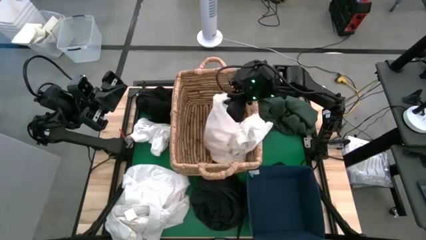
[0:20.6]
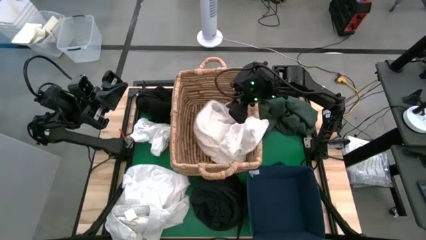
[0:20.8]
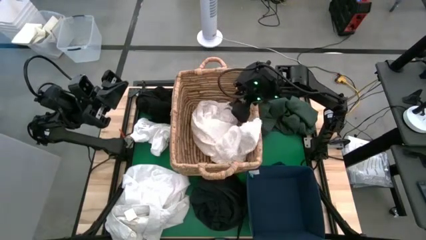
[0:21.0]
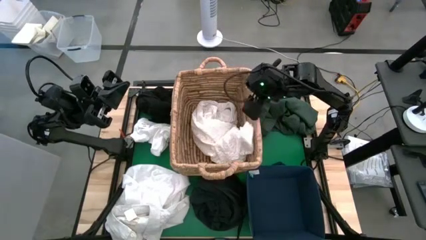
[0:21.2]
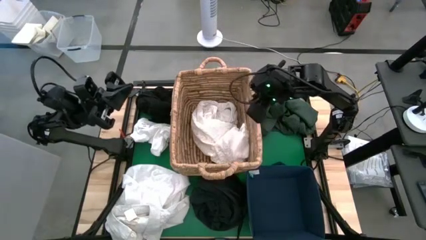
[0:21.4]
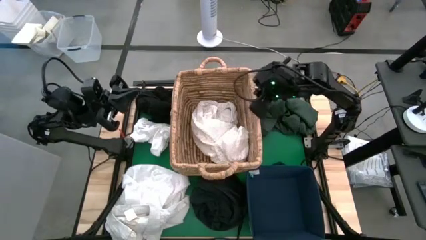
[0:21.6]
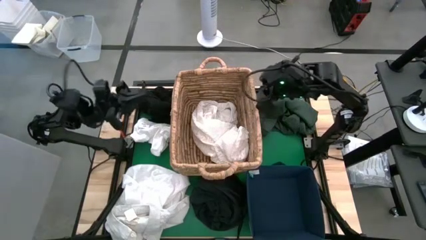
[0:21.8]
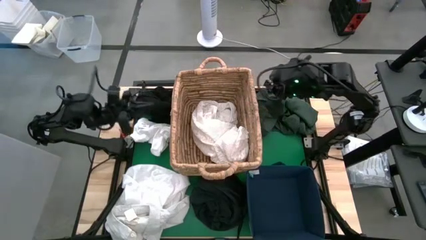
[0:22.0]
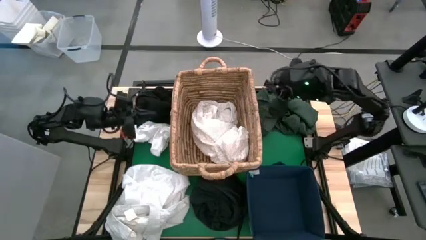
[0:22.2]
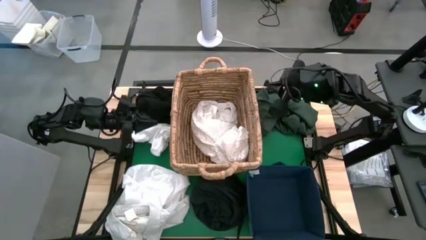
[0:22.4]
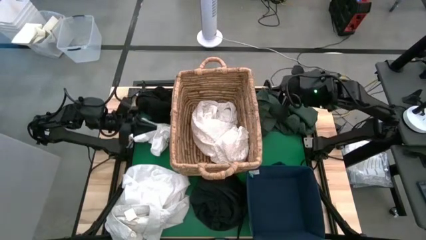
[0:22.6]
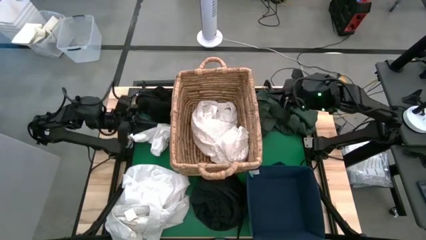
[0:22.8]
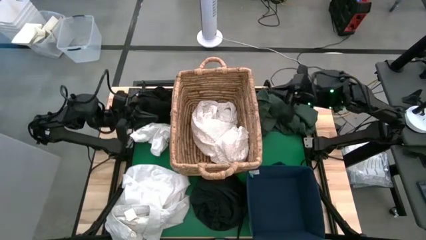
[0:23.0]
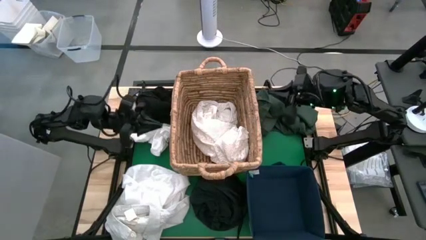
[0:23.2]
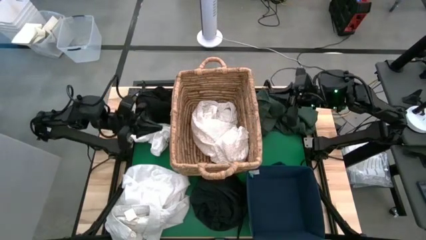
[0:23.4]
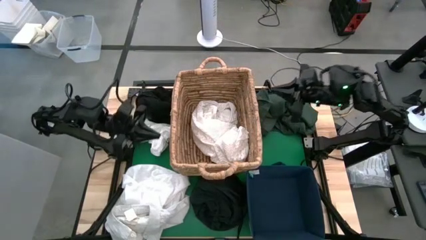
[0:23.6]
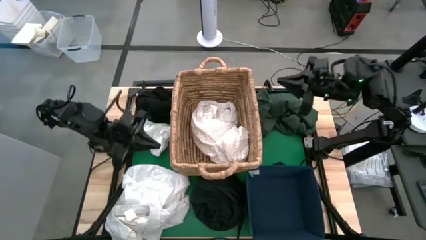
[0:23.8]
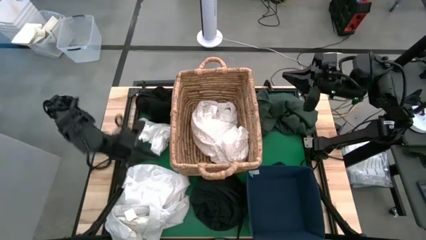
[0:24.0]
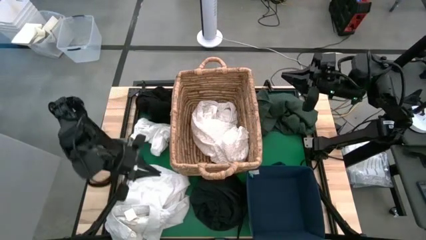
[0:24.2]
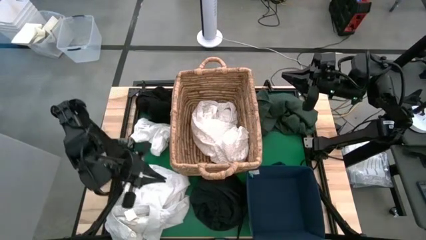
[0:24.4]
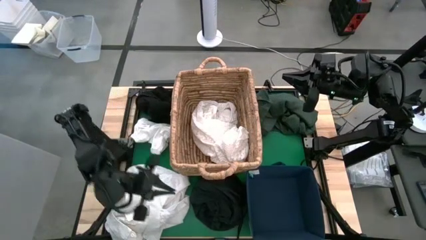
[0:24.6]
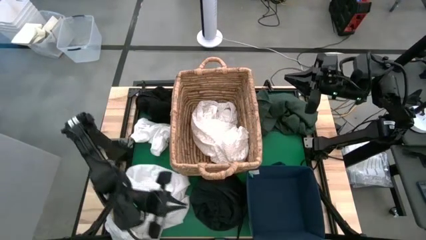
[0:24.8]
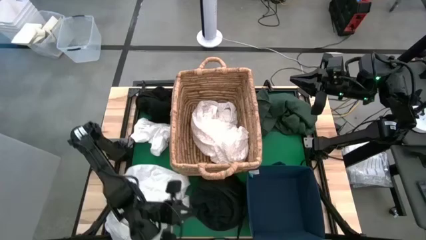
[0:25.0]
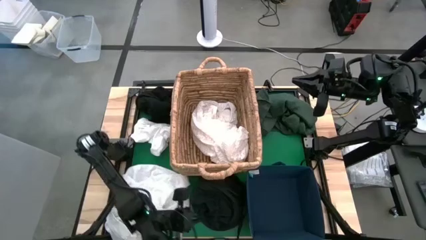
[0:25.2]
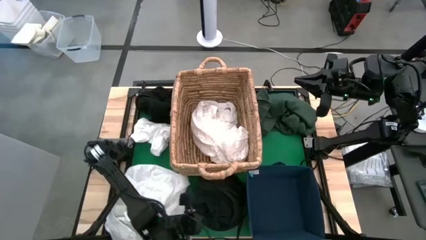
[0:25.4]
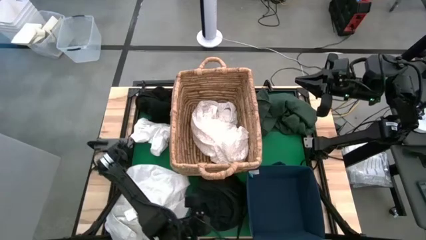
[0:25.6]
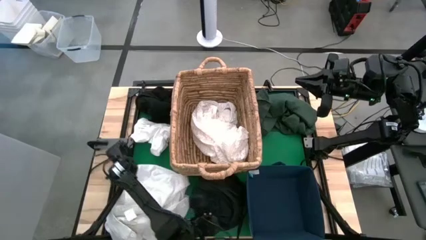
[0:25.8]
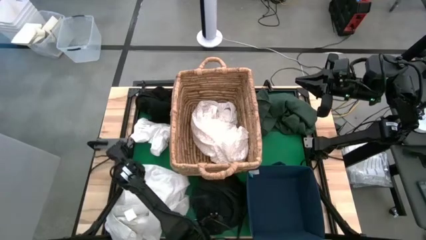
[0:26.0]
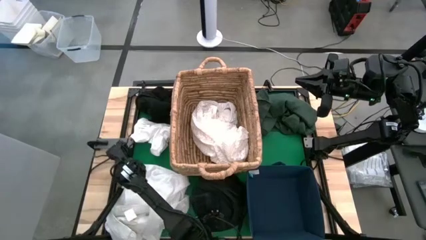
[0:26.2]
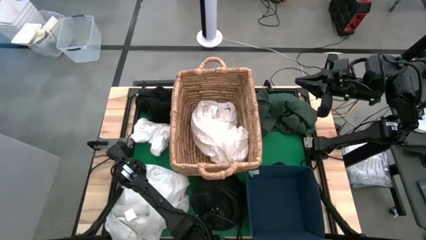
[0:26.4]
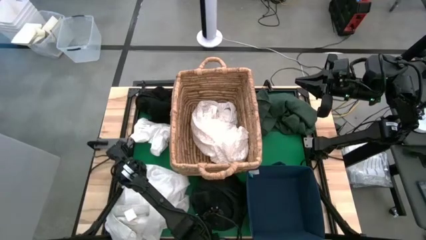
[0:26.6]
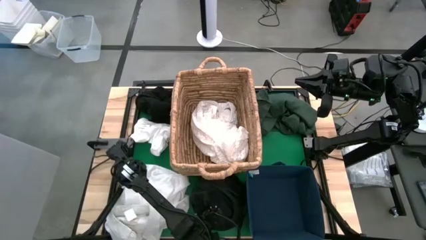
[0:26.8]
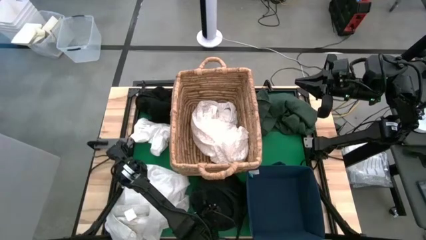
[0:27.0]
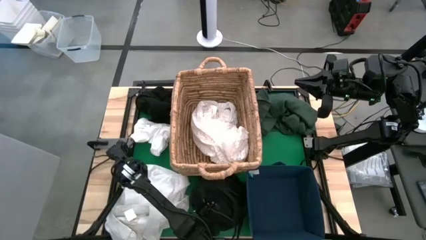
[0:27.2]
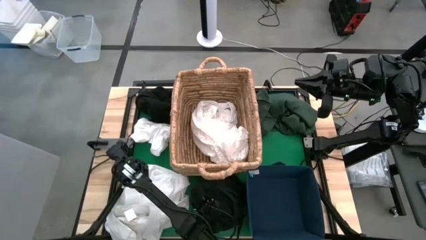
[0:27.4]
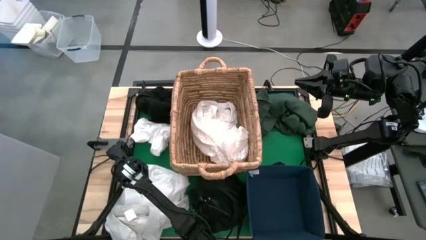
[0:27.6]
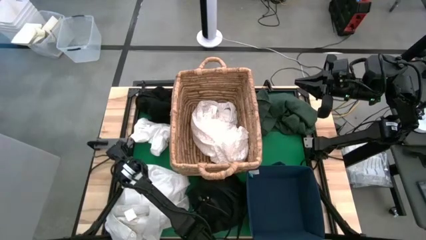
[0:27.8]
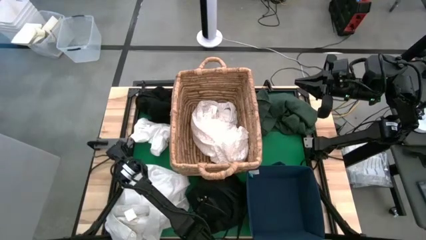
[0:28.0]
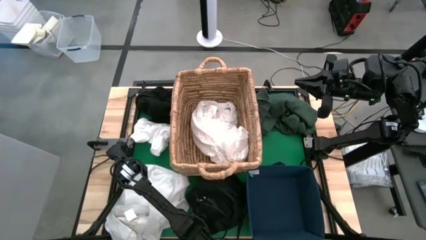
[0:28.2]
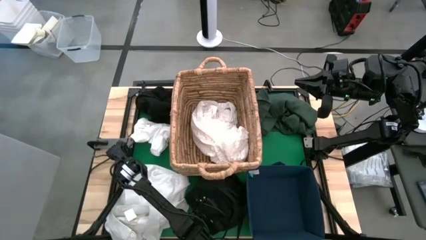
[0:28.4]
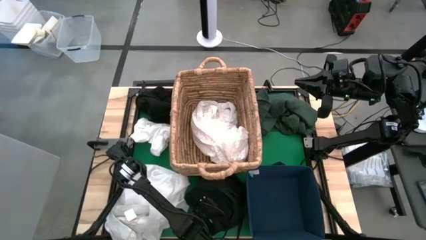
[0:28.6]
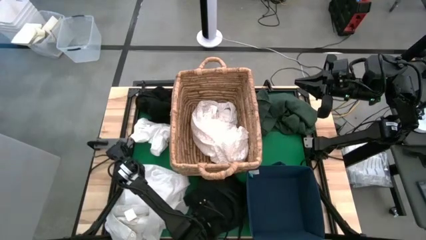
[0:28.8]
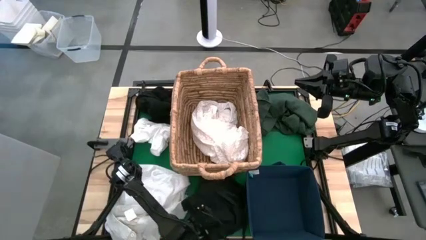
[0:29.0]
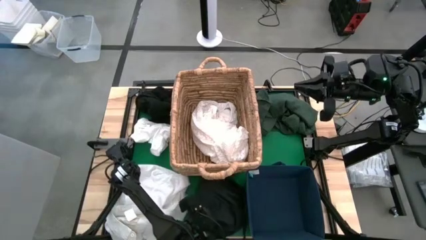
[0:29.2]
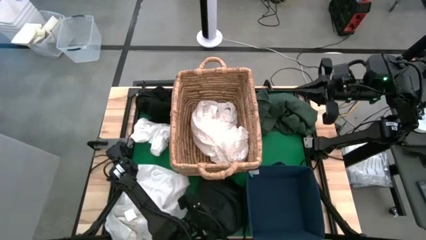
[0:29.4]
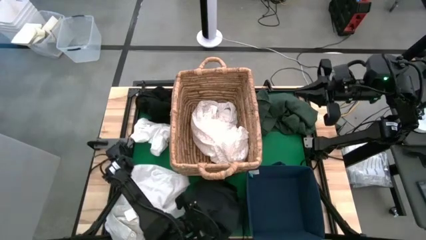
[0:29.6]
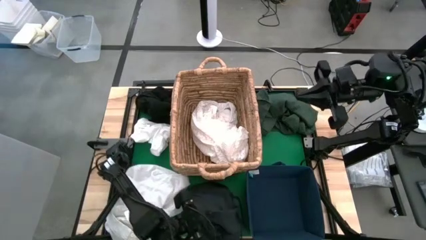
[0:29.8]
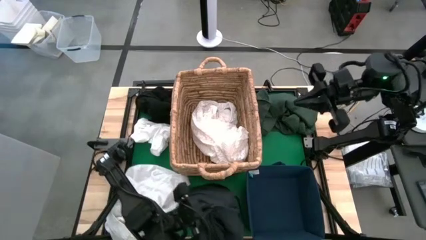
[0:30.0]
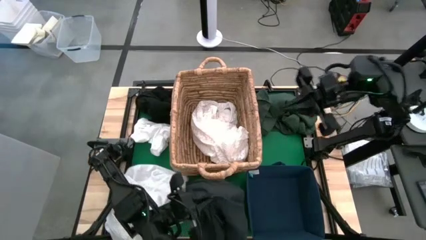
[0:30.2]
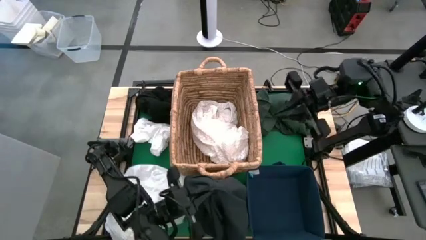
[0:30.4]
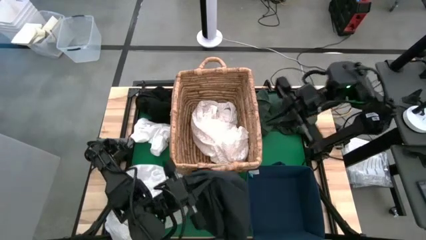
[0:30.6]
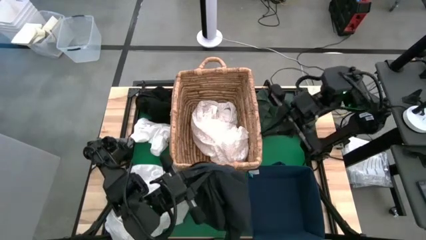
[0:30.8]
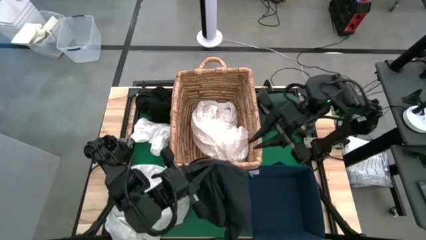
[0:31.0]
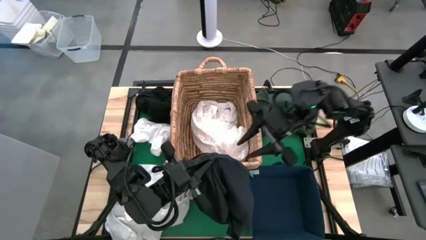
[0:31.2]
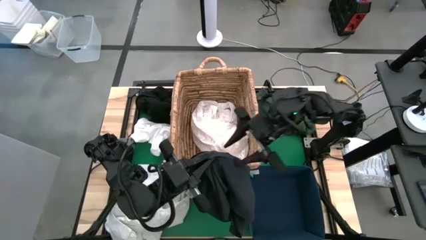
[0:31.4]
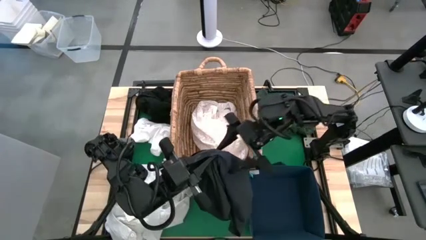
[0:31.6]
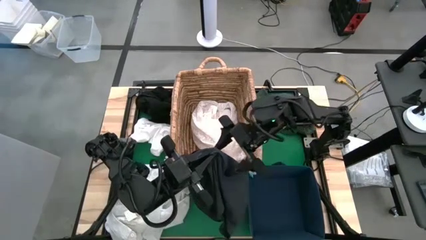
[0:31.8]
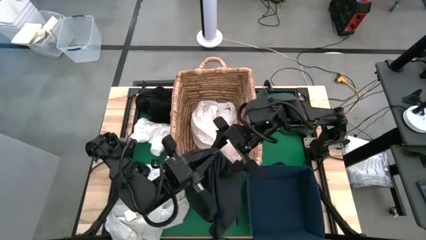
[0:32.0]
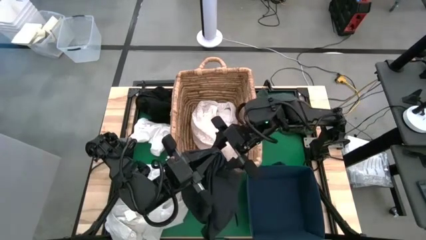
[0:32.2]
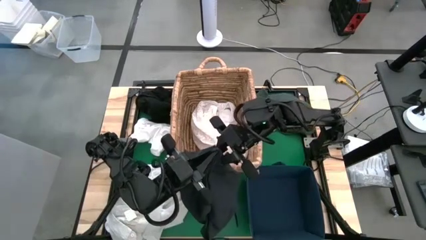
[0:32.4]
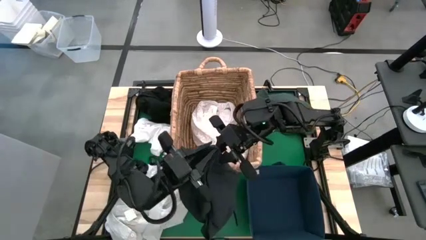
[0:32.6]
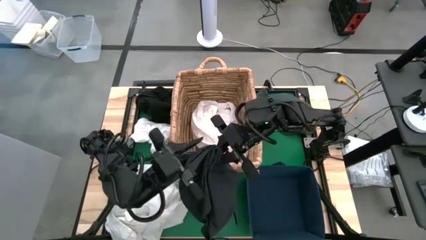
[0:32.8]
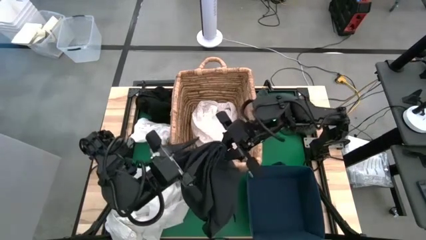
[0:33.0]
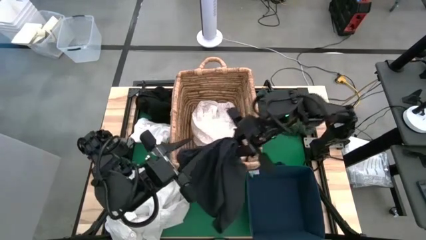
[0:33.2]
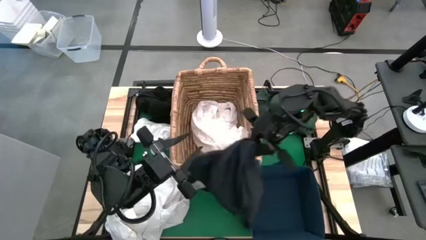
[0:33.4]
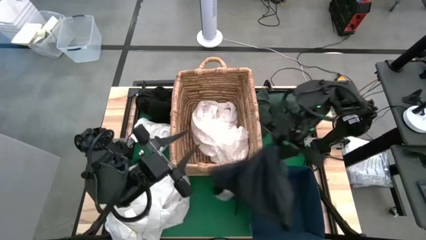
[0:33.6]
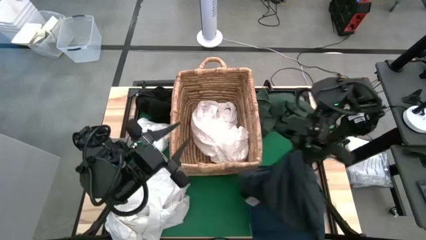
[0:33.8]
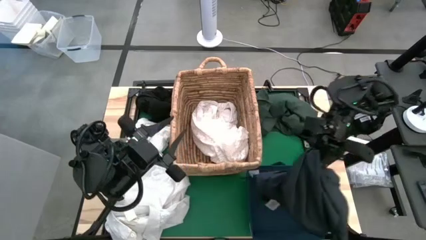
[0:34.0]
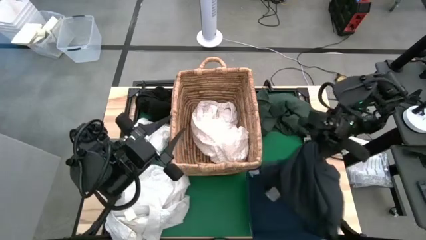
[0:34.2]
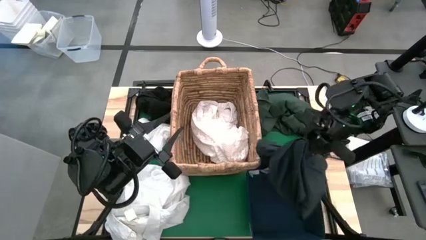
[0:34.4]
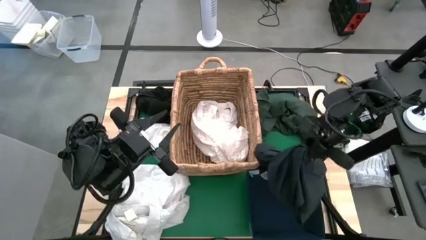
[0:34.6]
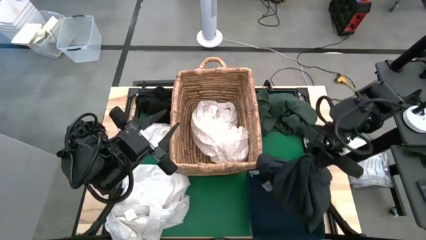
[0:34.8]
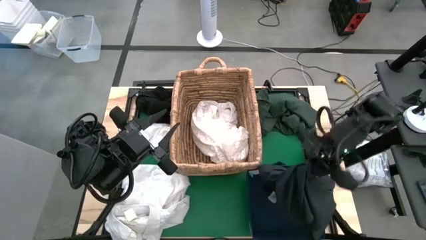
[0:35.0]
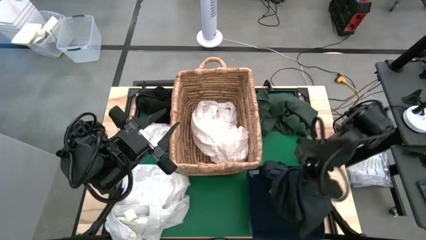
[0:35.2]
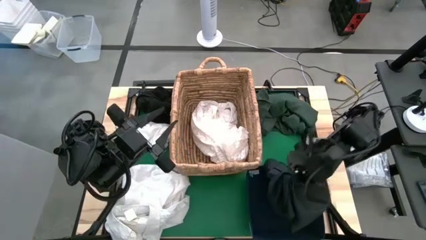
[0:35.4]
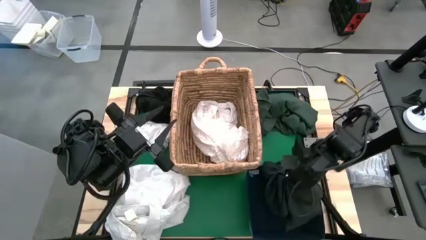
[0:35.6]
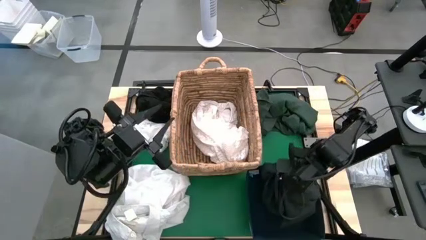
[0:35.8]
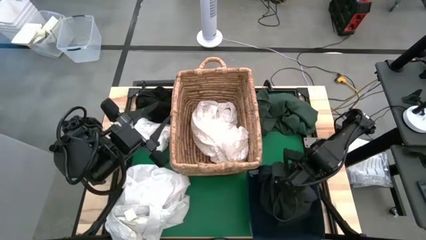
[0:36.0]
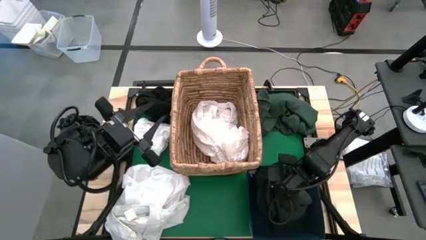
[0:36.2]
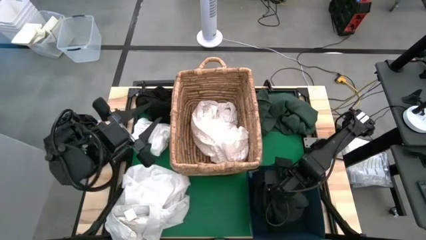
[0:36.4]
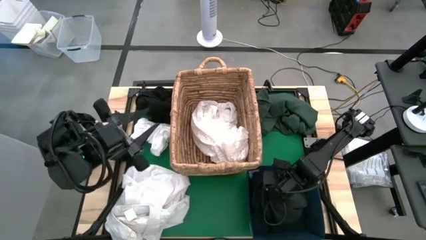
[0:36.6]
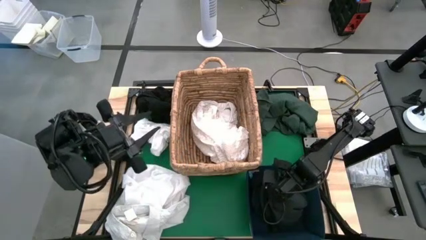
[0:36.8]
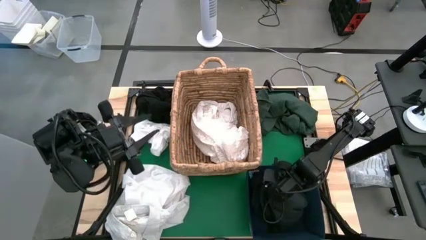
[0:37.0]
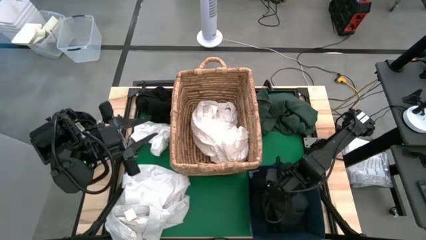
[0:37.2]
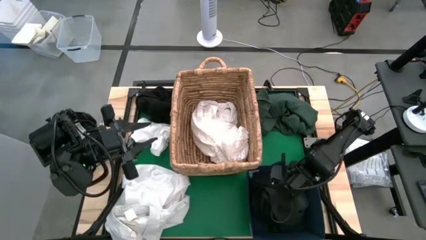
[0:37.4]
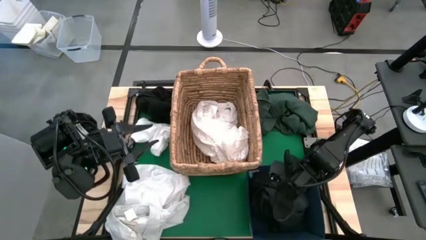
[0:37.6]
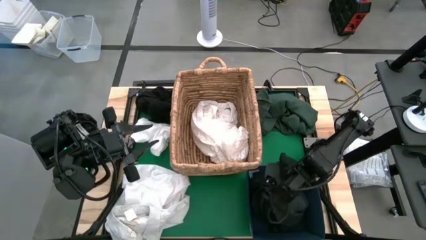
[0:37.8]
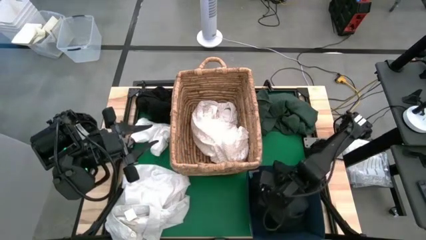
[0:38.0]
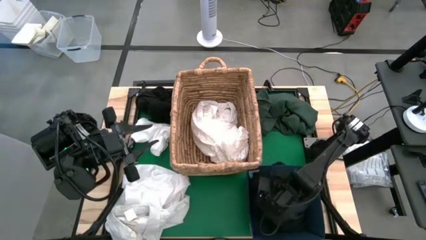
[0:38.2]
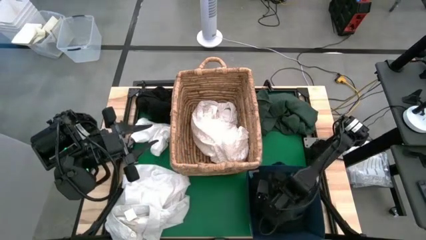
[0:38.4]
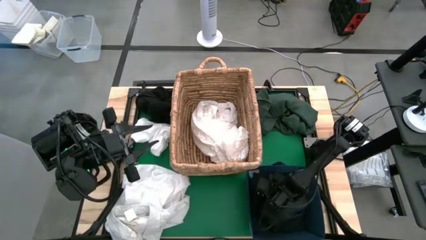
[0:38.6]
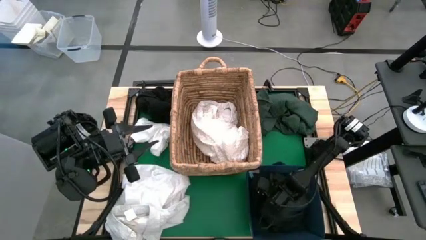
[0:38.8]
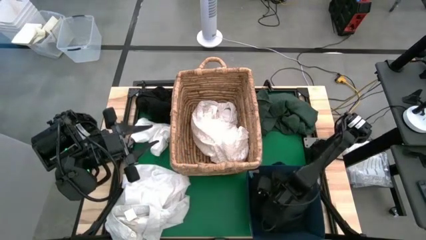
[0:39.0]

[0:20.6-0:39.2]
Put the black polo shirt into the laundry organizer
